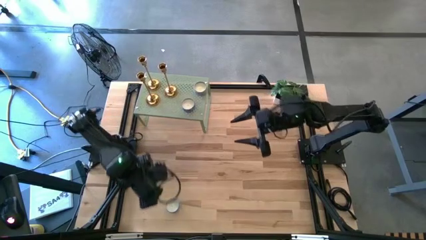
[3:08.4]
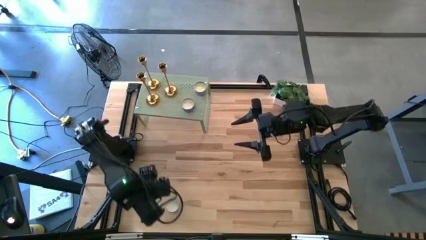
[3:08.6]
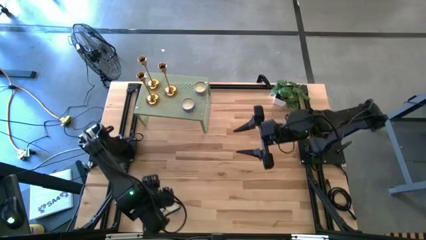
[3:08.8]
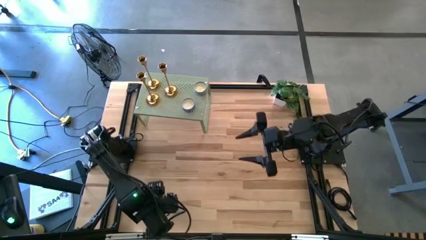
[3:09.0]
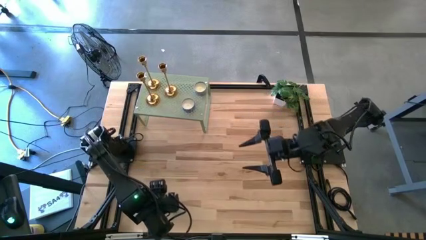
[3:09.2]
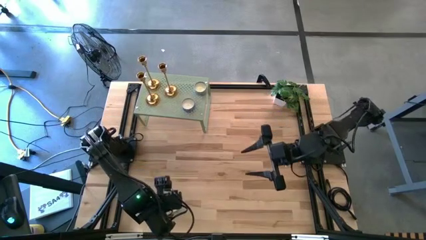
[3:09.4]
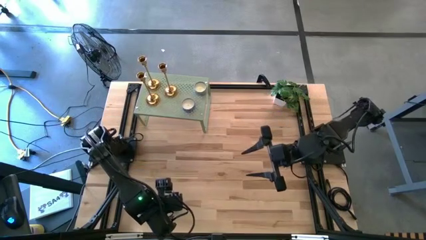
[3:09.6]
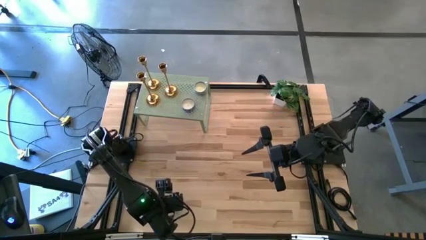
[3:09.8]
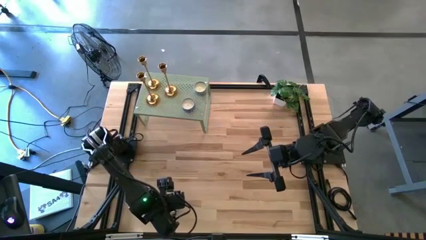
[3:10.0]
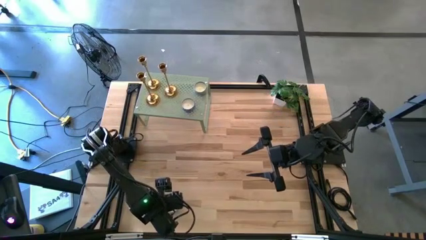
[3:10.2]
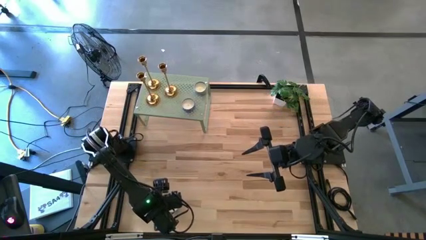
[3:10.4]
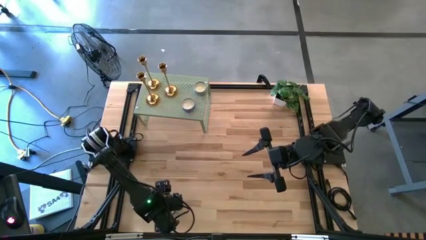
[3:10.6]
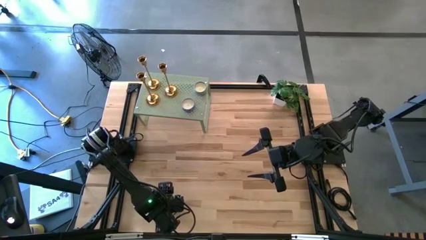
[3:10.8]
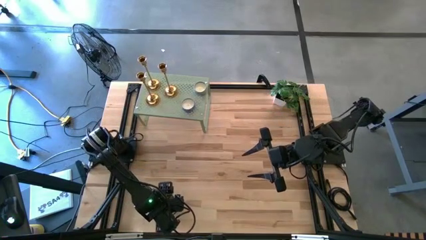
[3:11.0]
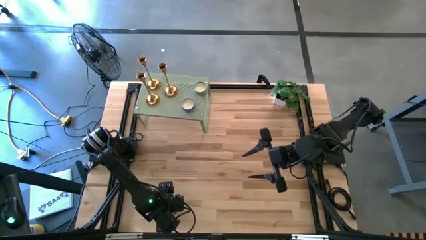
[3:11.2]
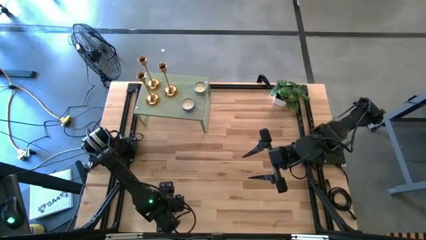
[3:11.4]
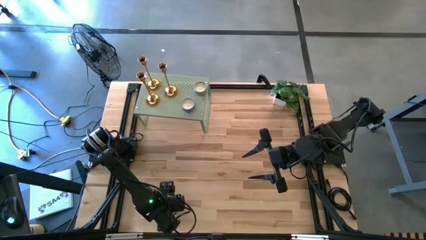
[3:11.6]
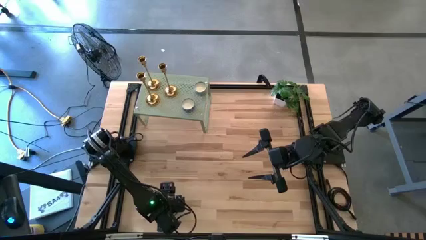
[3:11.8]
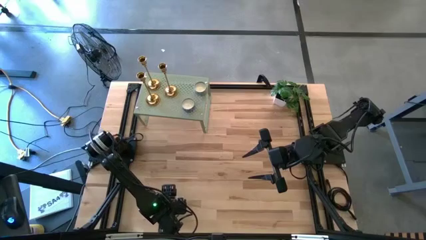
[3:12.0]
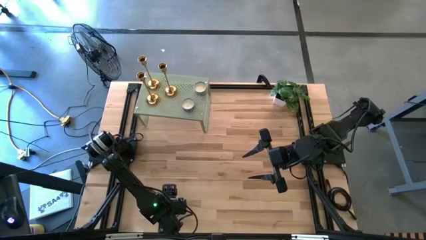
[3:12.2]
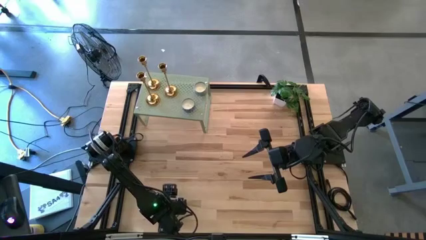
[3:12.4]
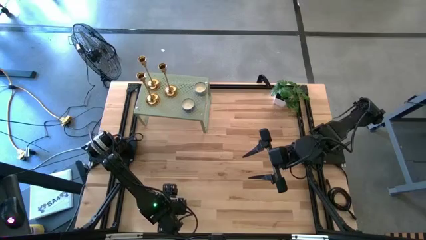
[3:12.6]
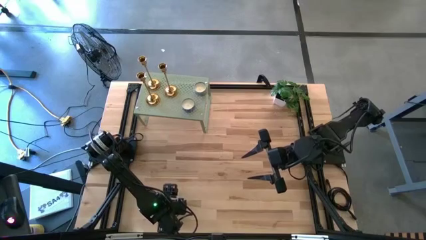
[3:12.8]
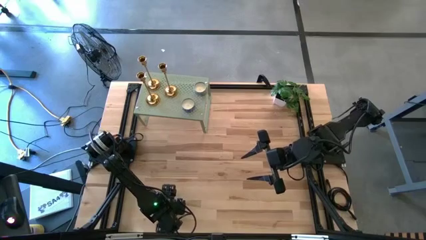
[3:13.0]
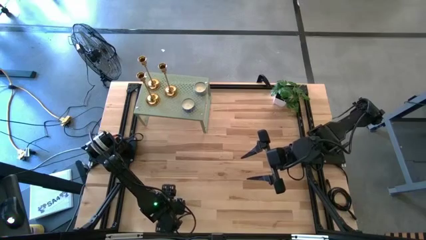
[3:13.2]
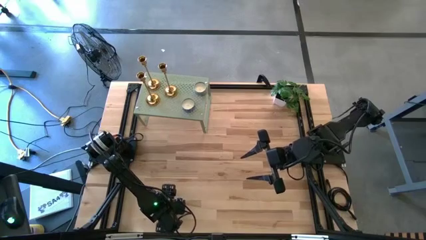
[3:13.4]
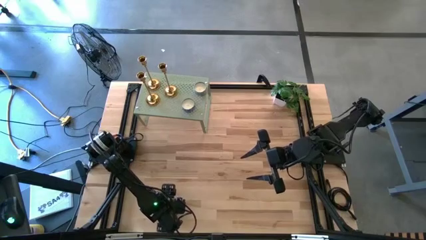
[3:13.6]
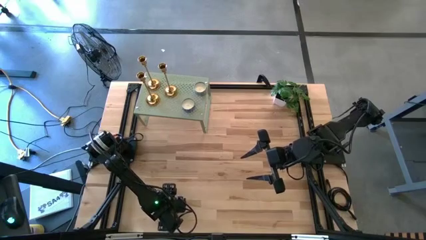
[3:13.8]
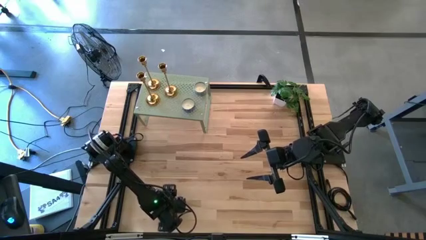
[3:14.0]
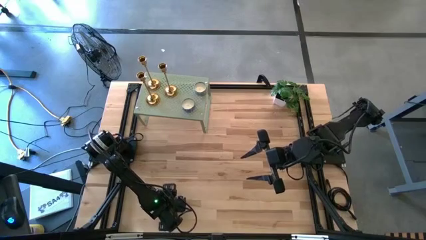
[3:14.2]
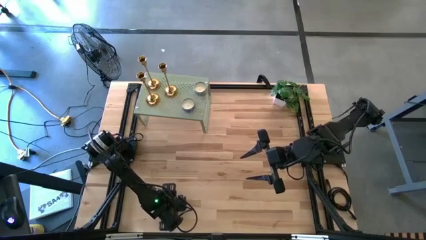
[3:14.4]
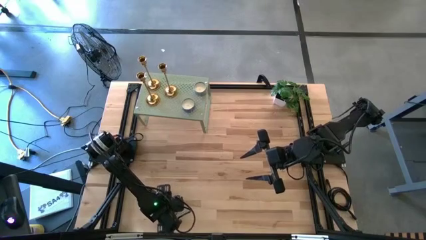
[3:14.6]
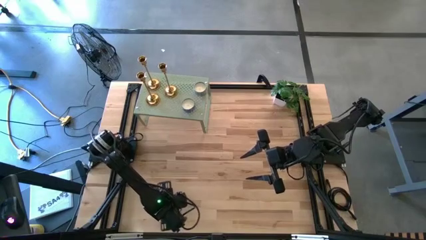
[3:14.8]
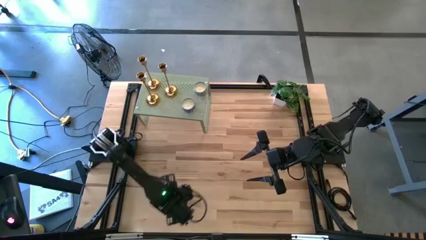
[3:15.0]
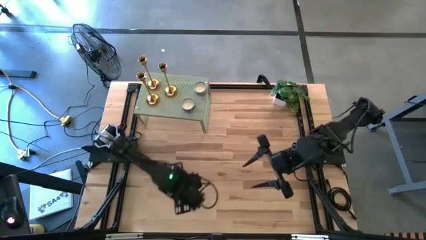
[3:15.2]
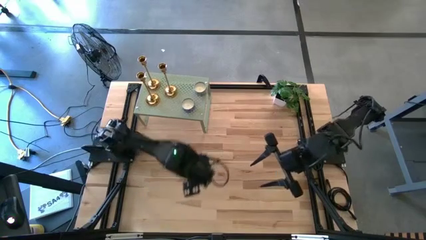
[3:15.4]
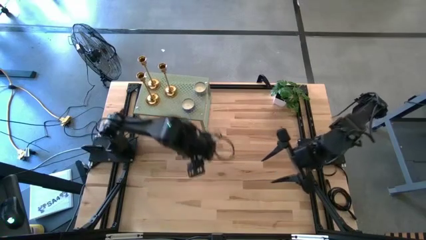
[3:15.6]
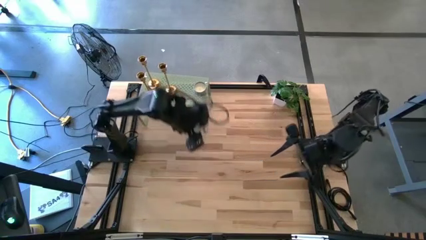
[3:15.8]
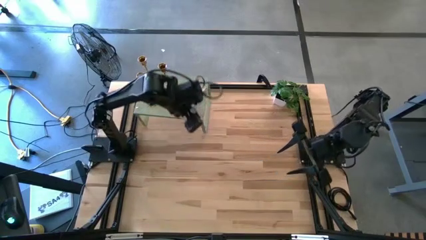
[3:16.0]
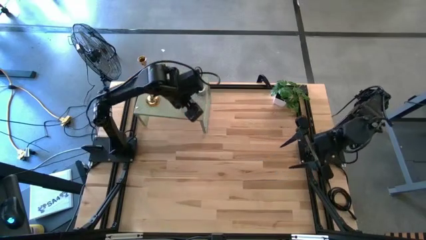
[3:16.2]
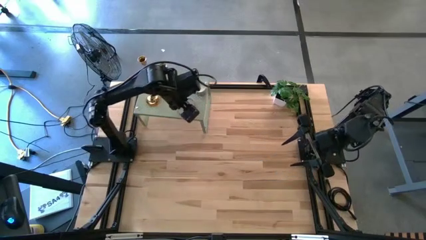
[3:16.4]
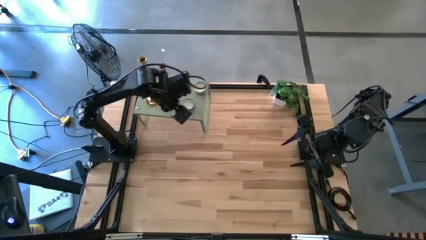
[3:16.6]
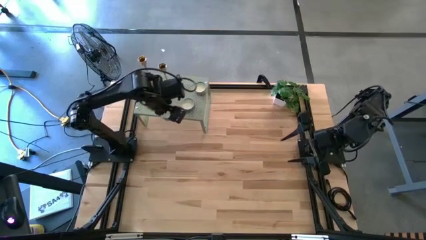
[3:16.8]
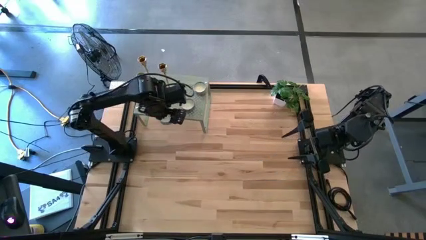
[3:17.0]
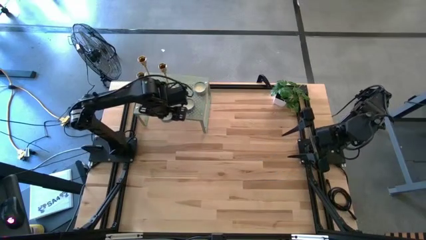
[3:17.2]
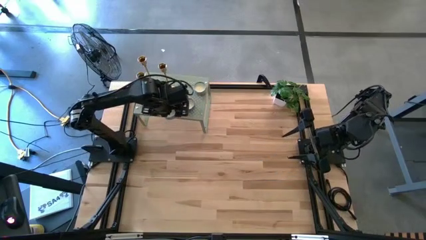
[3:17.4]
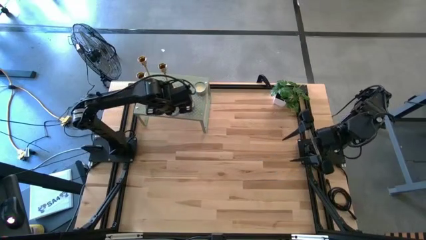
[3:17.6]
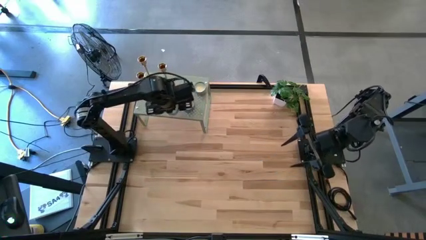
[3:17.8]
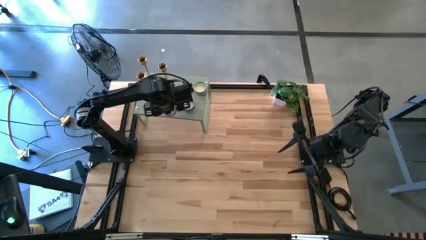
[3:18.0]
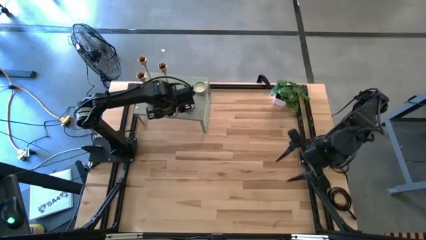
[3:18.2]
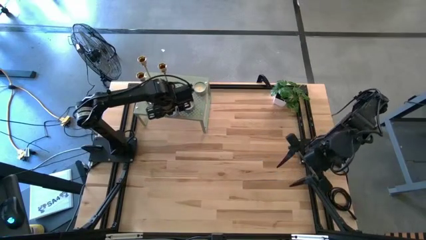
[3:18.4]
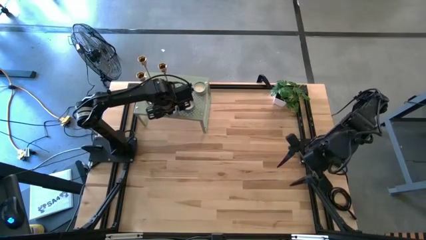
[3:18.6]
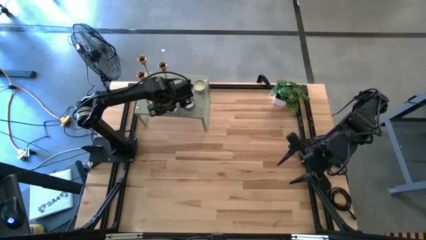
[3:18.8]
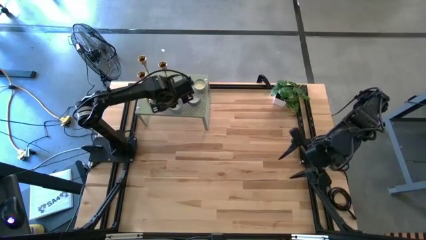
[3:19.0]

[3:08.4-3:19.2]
Task: Pick & Place candle stick holders
Put the blue patterned round candle on the shelf

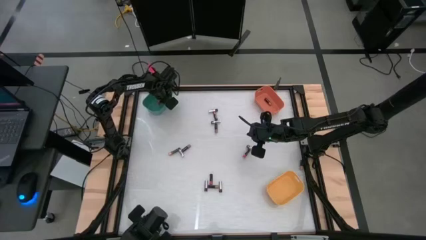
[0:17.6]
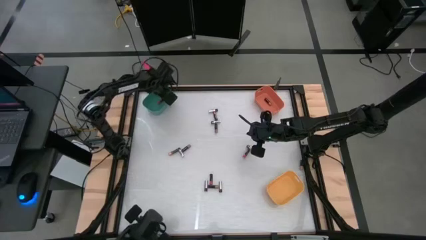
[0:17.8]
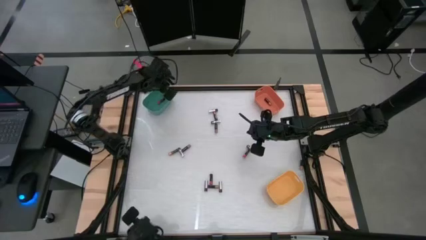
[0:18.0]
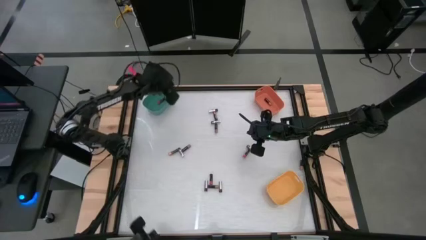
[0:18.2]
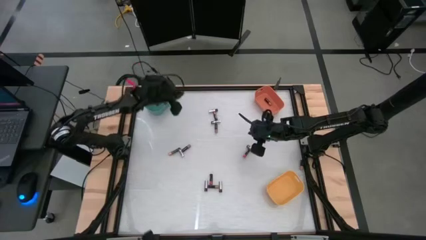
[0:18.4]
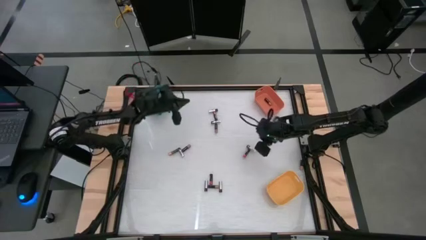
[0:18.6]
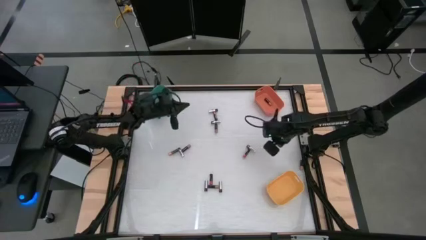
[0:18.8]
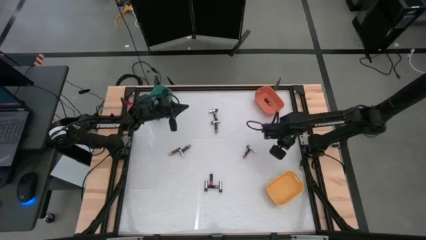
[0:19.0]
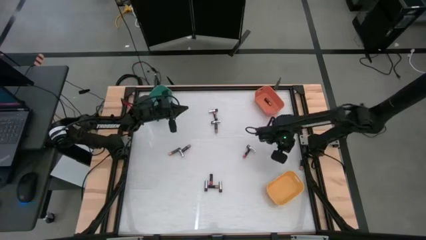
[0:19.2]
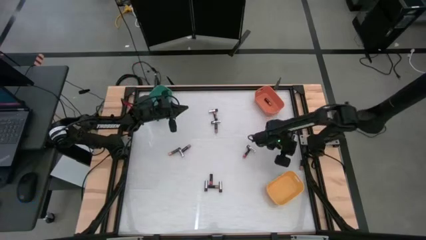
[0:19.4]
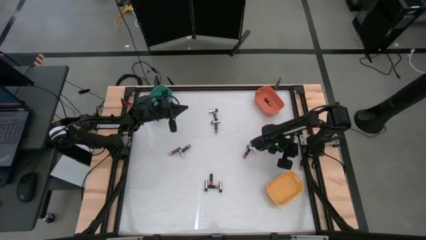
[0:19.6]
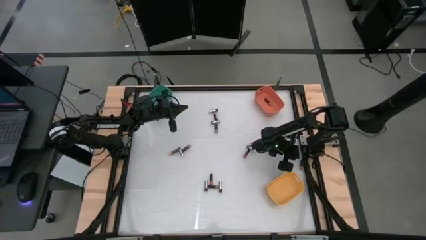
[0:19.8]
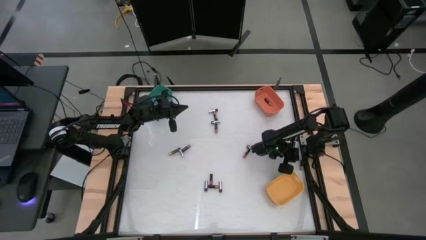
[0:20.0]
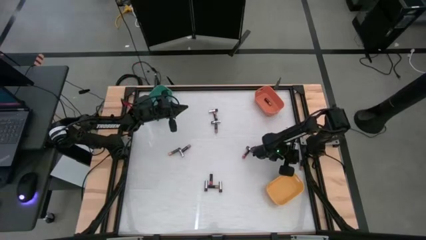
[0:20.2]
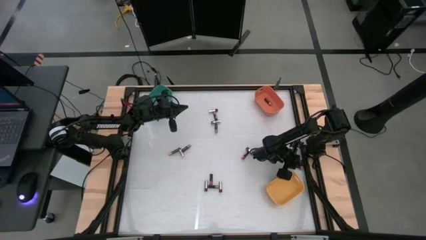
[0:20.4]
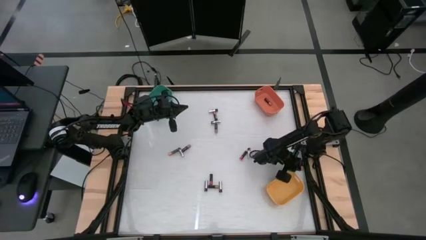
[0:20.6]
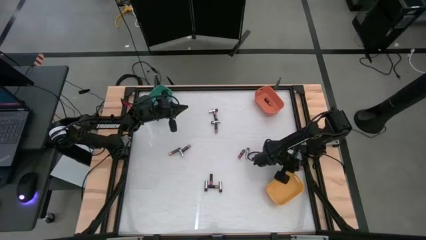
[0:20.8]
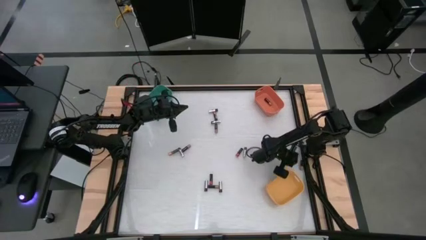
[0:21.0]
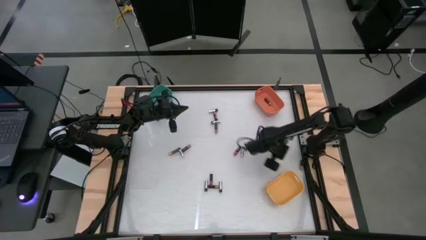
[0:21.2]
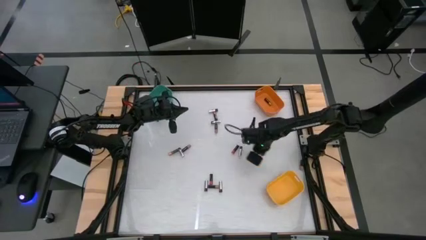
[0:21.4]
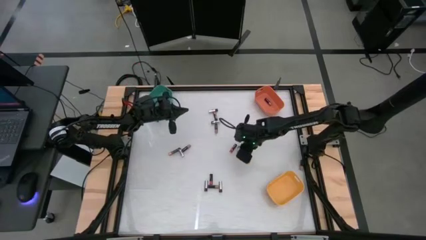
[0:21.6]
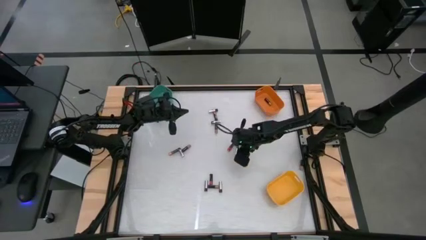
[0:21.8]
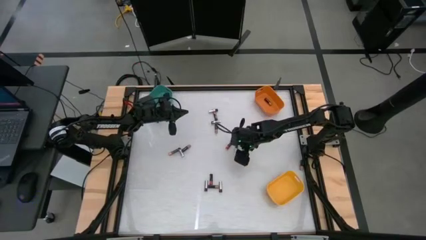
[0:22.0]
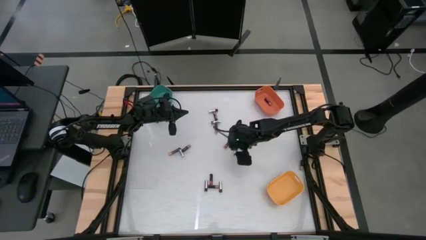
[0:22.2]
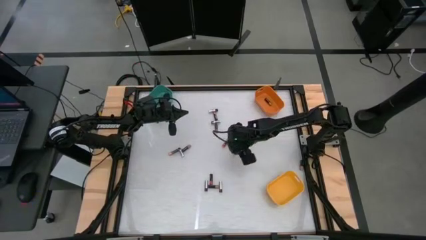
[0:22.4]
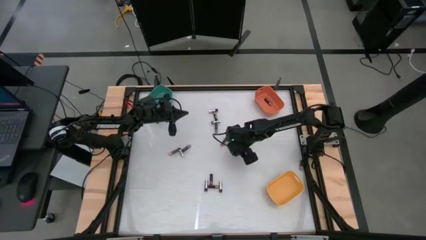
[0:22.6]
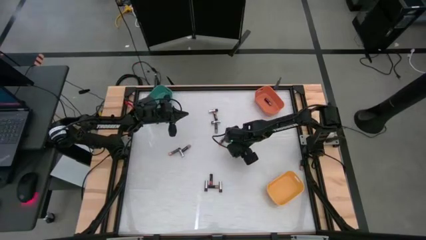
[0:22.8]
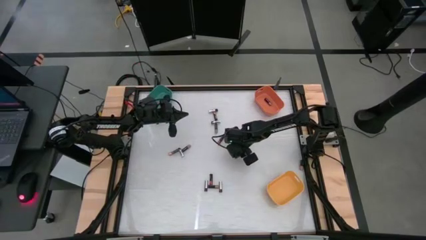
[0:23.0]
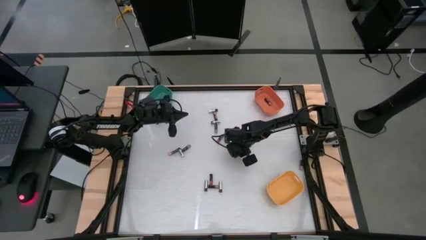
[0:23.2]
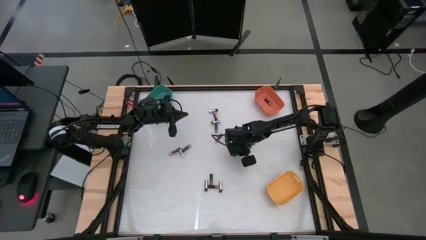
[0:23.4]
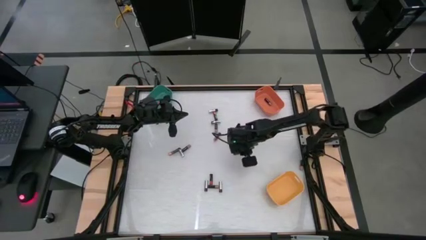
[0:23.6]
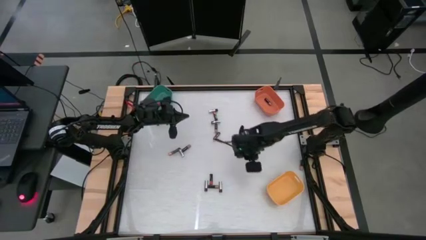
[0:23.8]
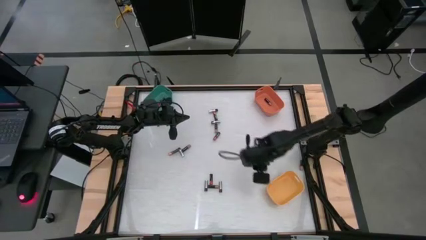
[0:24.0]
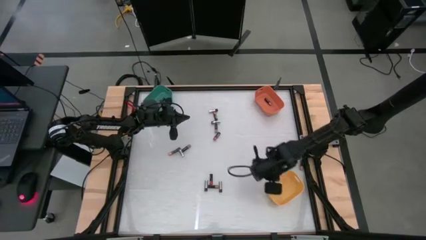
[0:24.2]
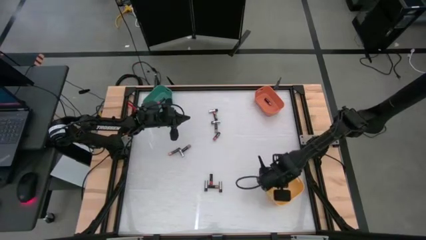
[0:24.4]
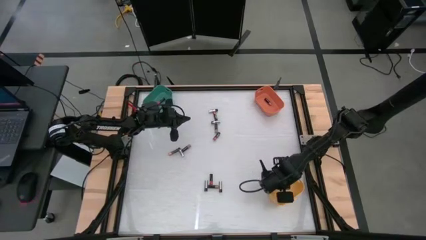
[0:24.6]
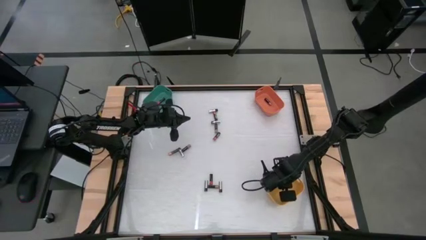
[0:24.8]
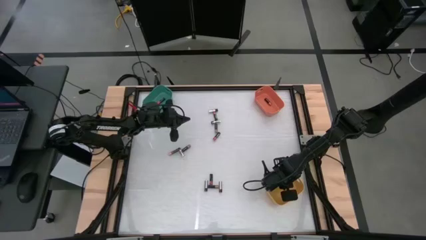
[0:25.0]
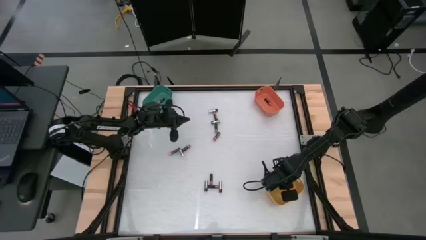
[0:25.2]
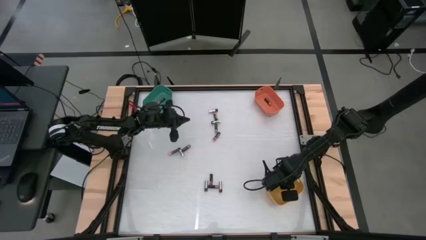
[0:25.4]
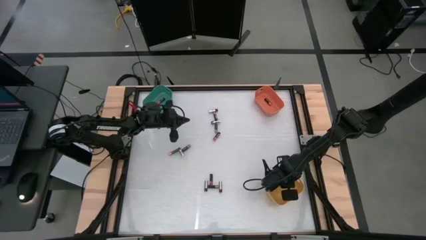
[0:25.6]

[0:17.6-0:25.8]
Task: Sort batteries
Put the silver battery into the yellow bin
